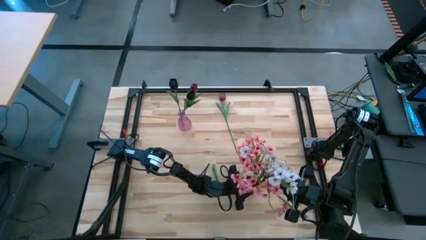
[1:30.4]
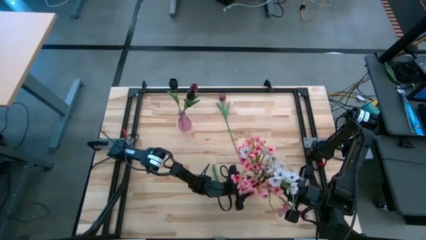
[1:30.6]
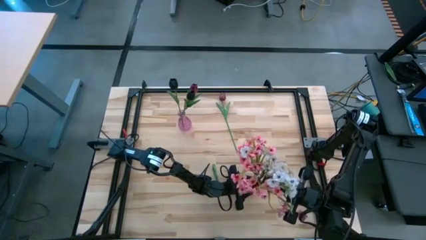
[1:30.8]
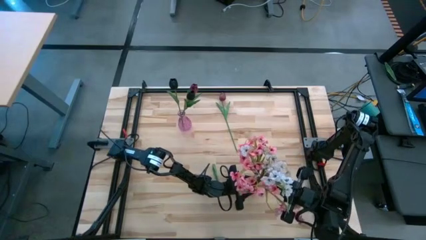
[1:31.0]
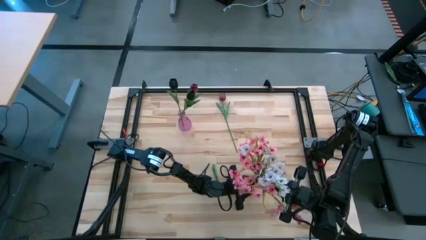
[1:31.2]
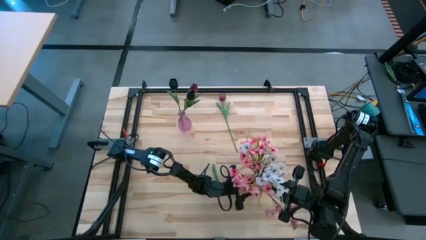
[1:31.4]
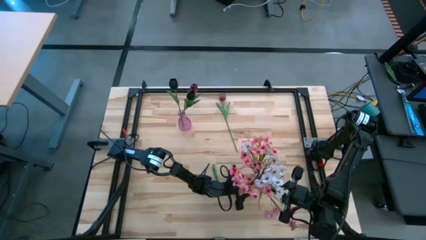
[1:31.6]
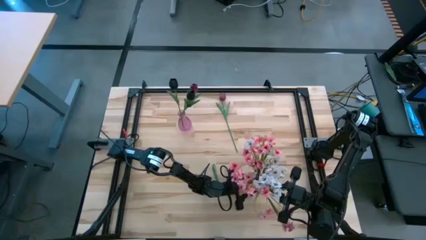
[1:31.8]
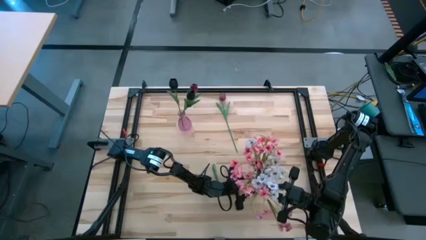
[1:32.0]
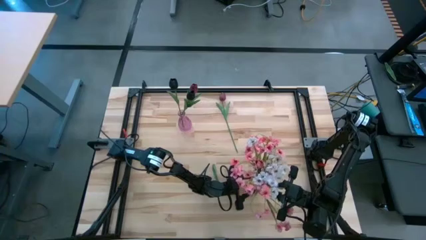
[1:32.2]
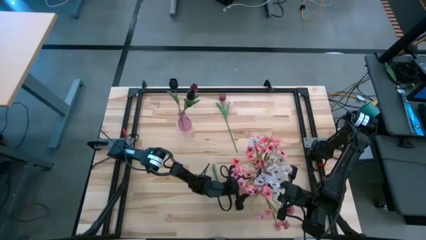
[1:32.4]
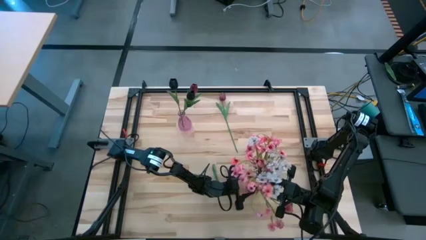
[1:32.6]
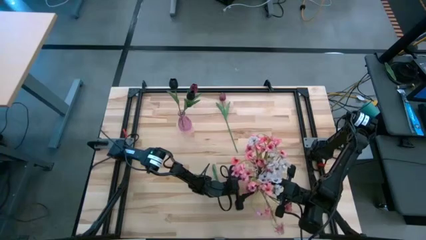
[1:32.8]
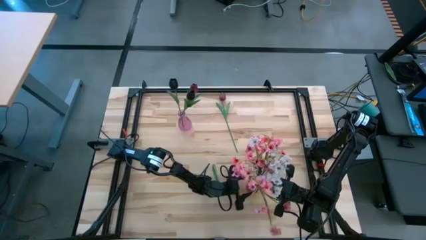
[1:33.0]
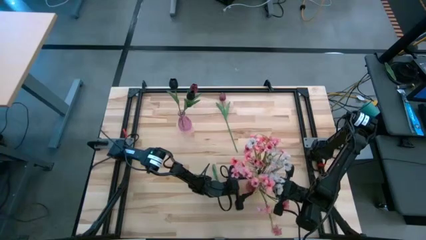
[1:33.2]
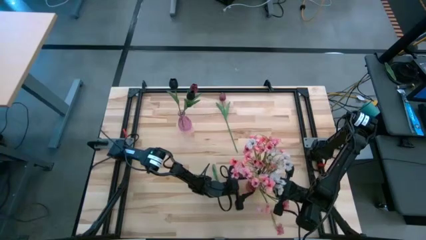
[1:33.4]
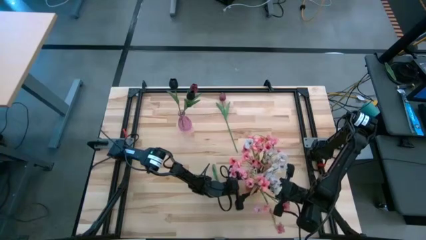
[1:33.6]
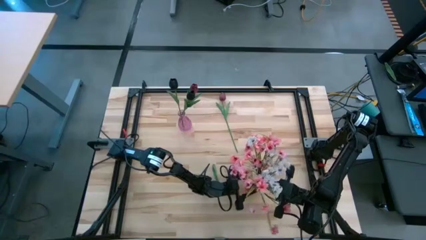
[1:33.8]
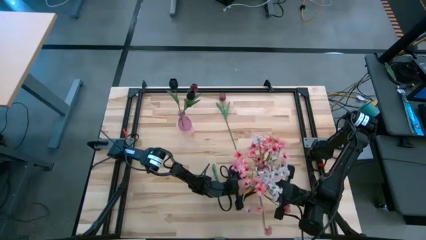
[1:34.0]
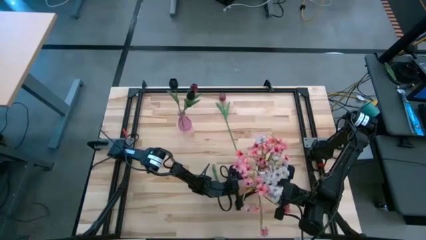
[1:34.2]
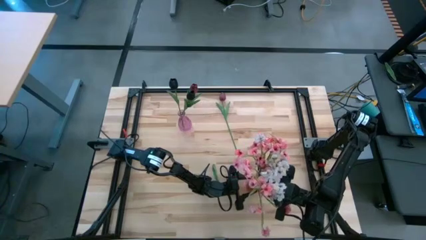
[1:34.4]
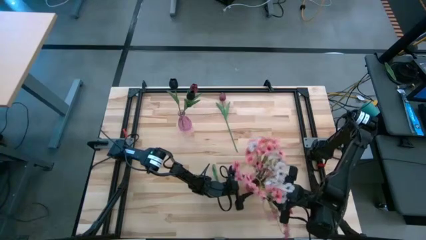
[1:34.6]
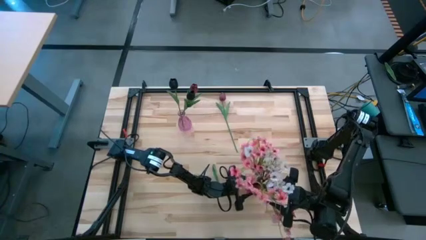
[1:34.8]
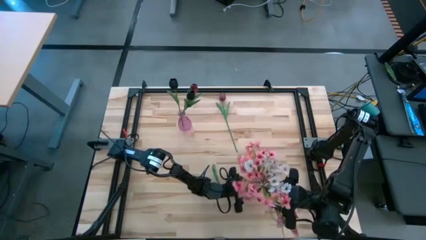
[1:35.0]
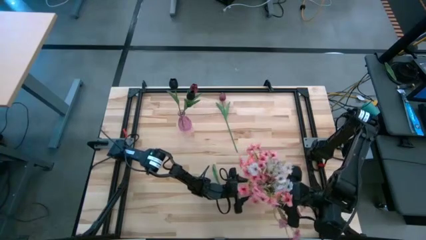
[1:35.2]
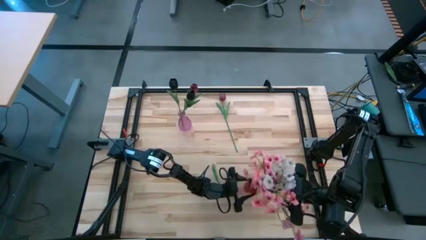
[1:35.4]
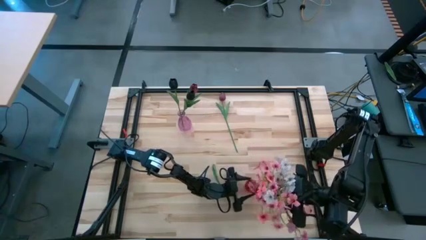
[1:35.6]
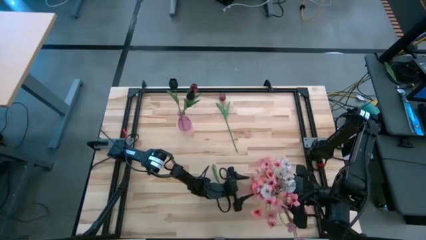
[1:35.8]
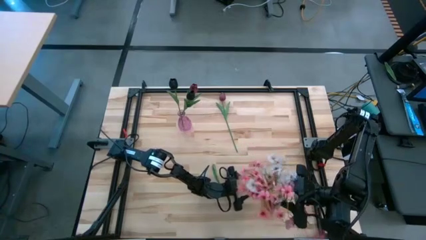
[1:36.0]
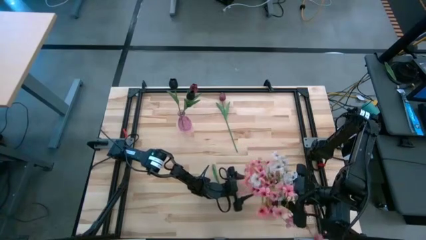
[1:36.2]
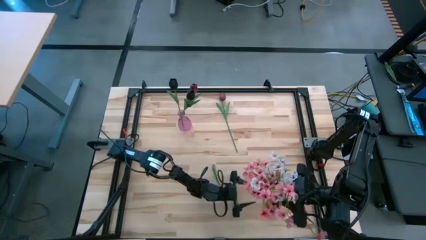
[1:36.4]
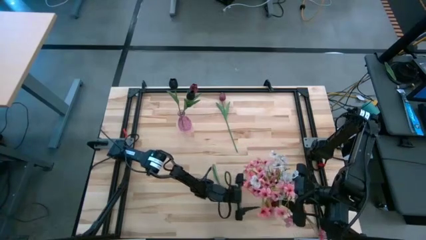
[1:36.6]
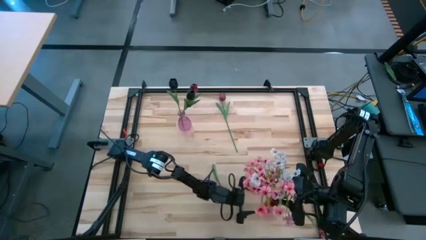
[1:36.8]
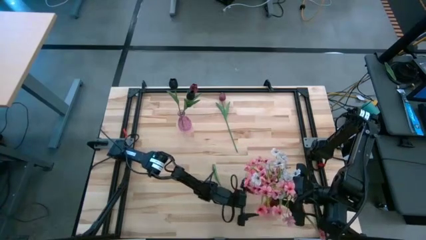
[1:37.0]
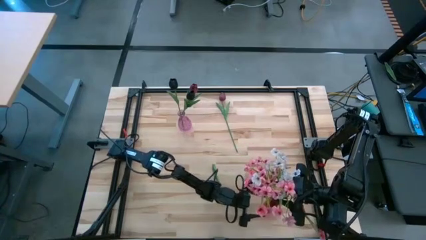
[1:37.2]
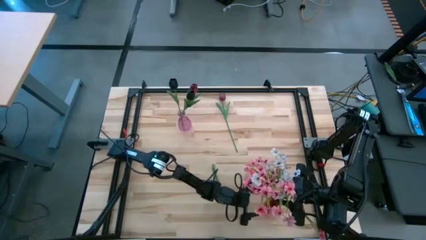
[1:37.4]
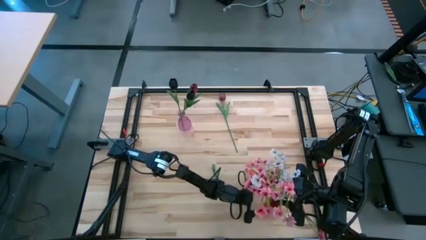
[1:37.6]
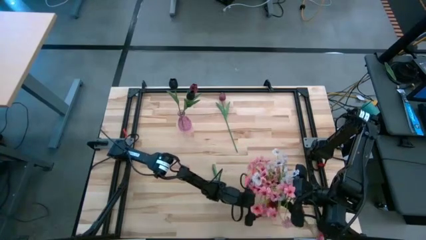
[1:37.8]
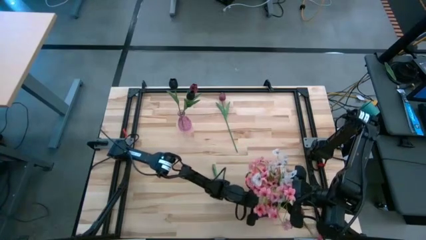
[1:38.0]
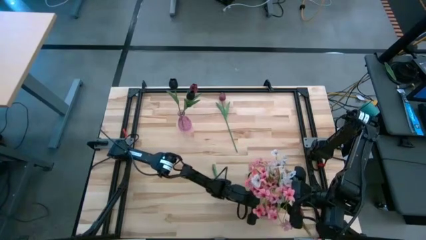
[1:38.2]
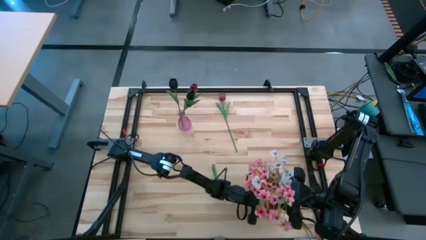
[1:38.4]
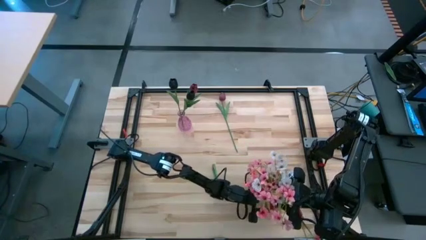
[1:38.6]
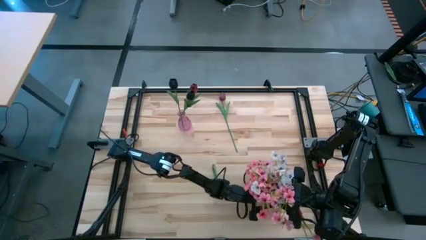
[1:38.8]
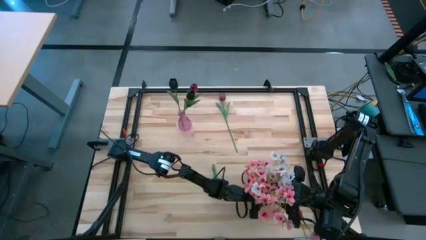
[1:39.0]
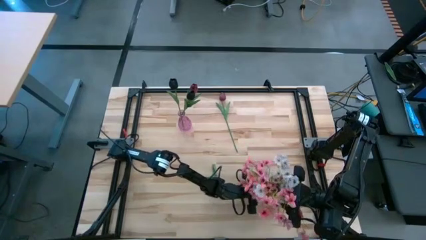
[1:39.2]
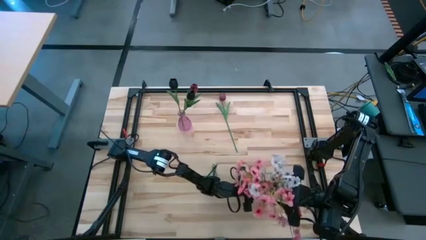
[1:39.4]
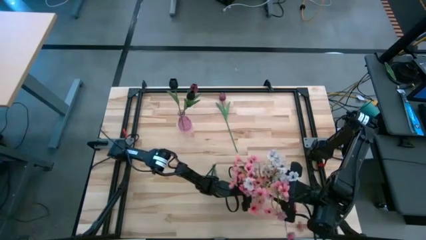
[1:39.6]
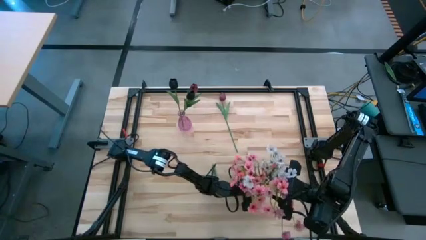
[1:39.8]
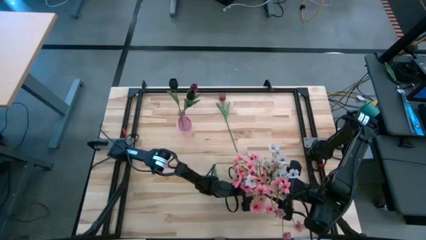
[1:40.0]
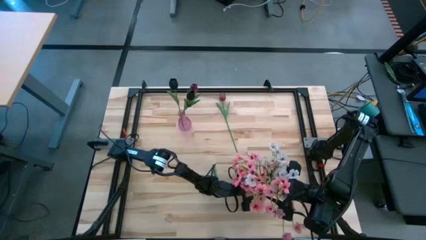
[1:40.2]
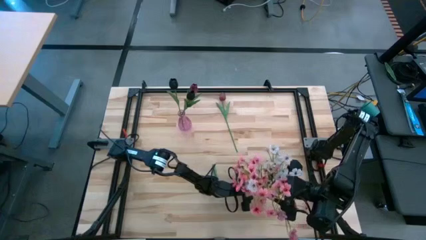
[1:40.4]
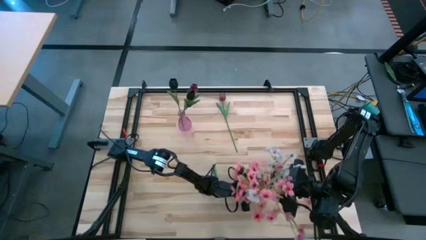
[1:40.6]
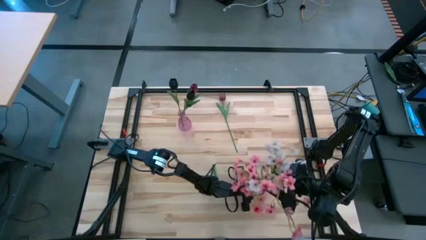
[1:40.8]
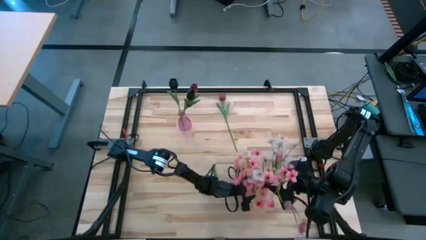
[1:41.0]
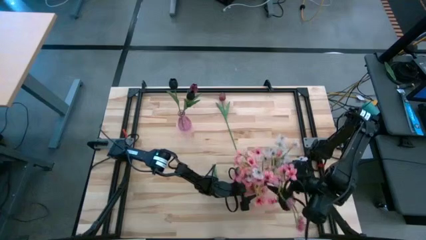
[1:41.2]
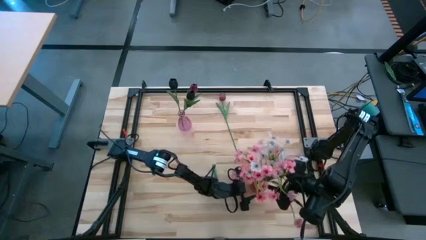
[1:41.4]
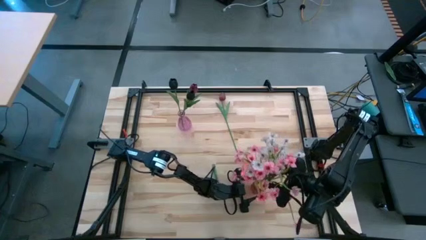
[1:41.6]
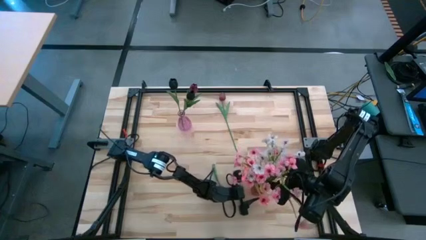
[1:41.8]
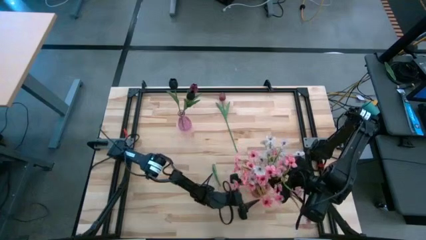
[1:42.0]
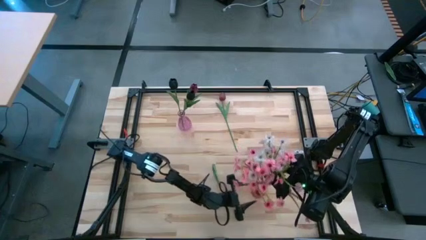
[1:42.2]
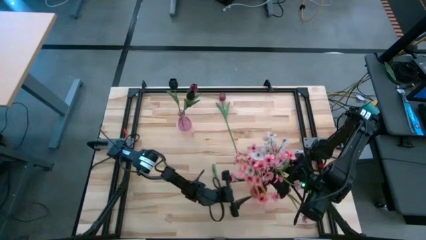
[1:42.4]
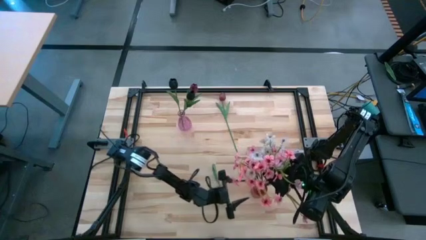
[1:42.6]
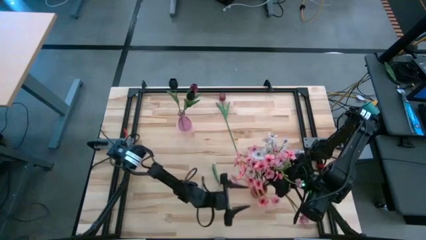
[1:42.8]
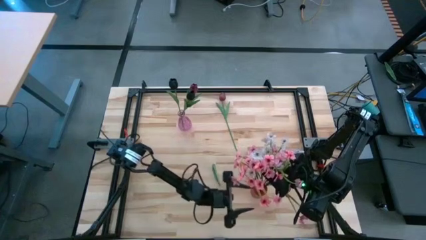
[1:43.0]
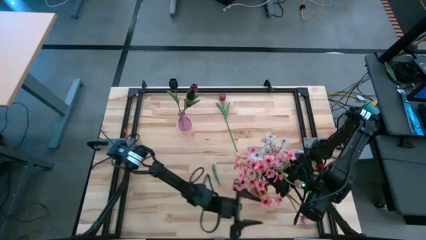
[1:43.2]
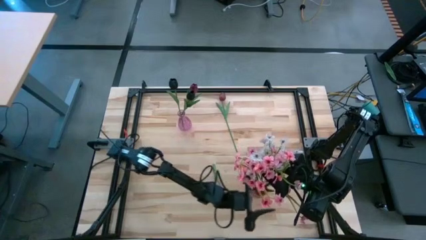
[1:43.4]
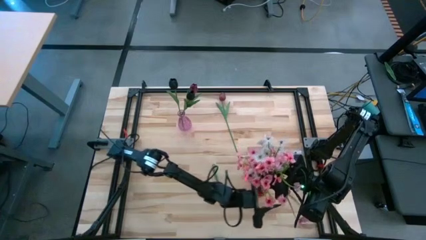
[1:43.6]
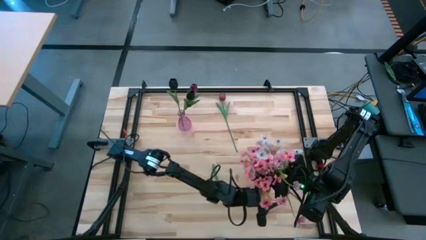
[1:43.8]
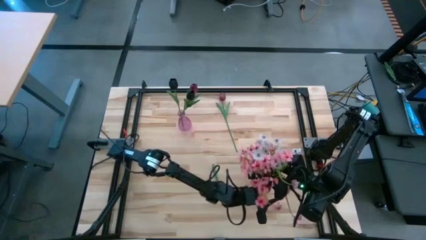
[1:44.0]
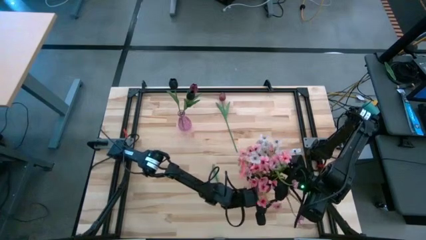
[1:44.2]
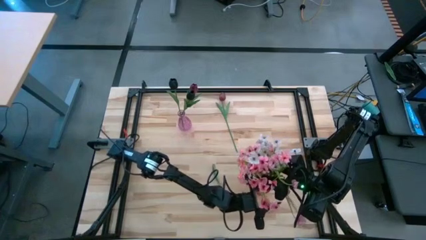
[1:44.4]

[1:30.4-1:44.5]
Task: Sort flowers into vase by color
Put the white flowers into the red vase

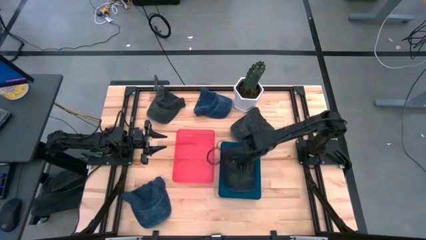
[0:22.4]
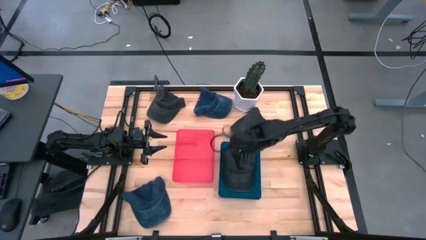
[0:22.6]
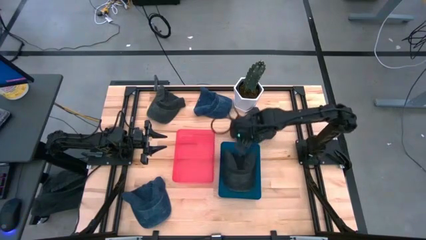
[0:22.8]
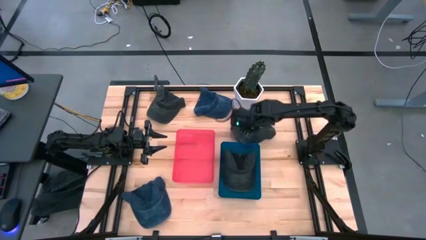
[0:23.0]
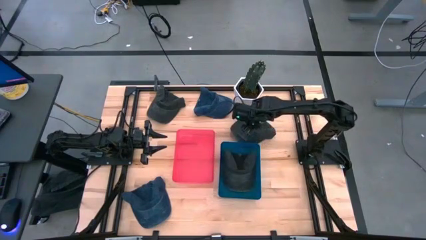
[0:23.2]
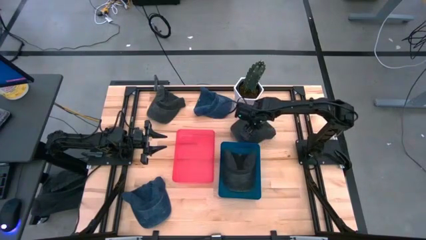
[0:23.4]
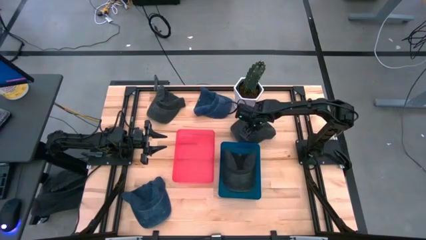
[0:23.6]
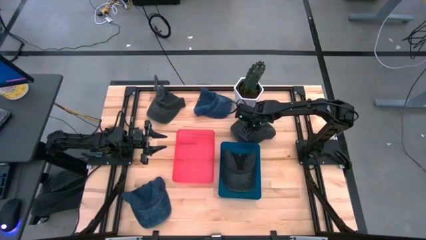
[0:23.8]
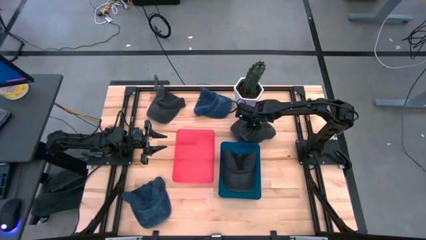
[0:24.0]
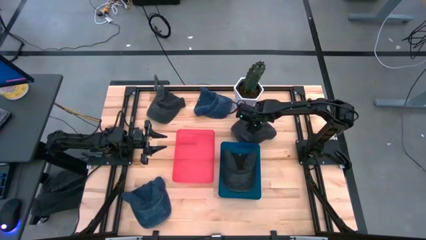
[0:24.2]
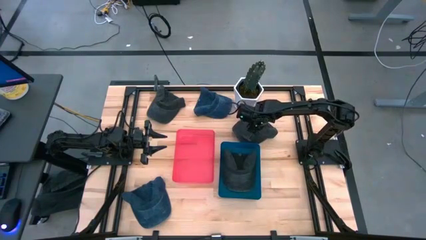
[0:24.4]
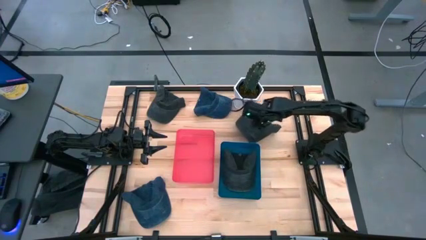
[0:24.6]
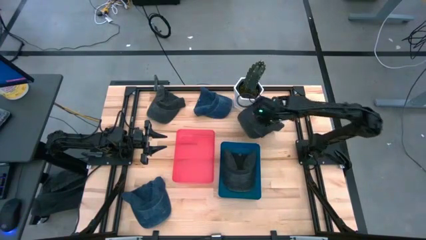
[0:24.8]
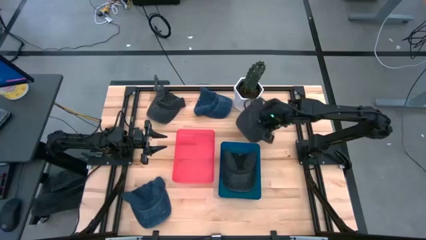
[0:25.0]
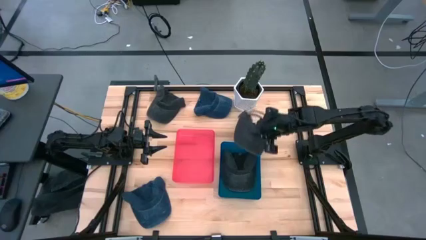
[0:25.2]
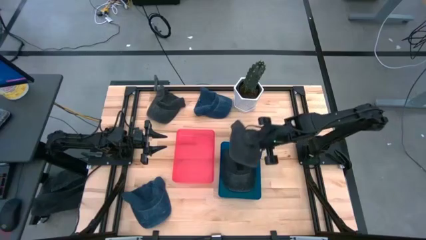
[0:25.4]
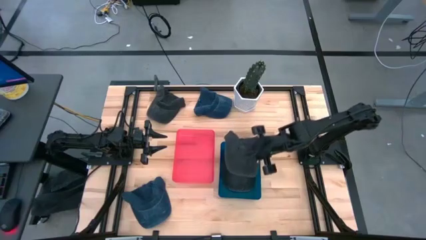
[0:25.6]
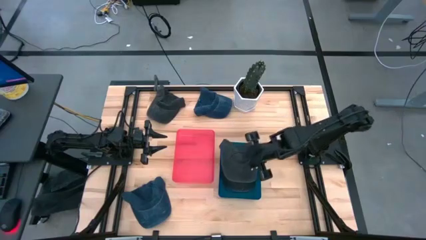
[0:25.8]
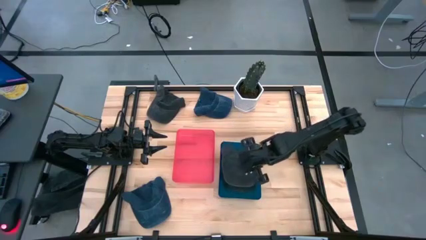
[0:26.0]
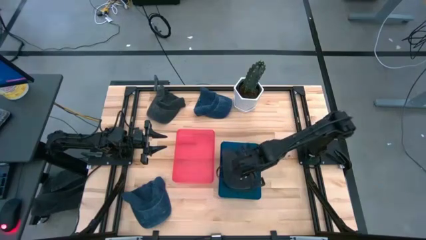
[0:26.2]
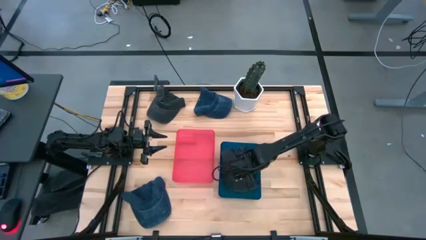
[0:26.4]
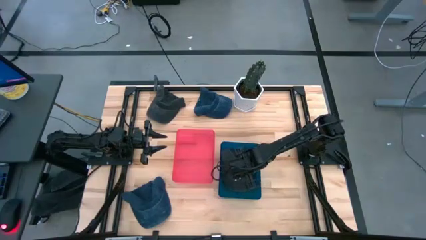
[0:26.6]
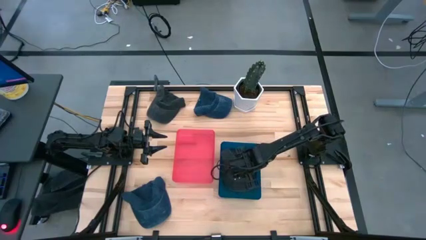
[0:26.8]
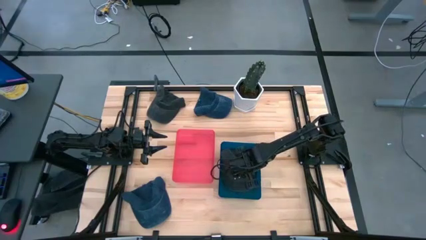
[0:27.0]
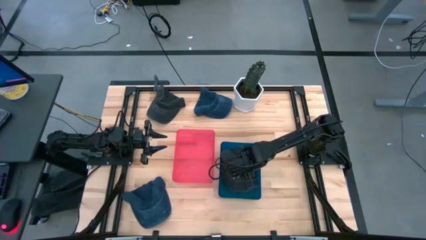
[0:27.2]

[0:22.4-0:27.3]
Task: Pick & Place hat
Put the right black cap into the blue bin
